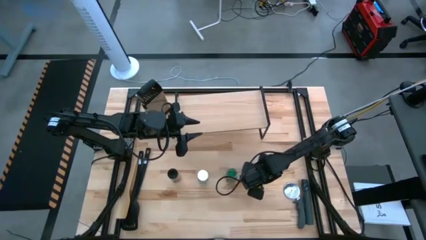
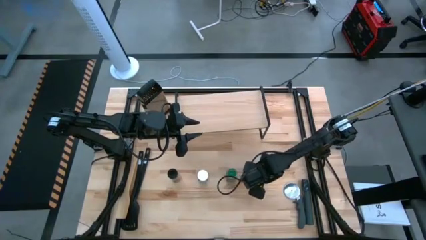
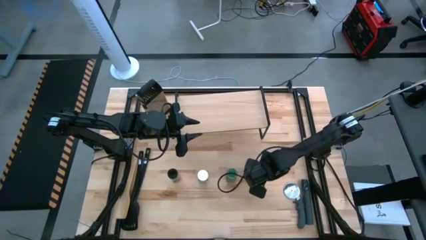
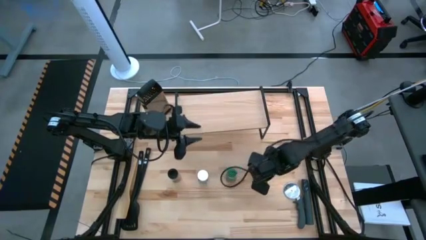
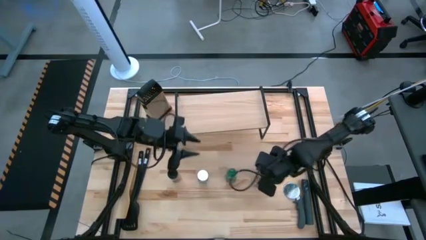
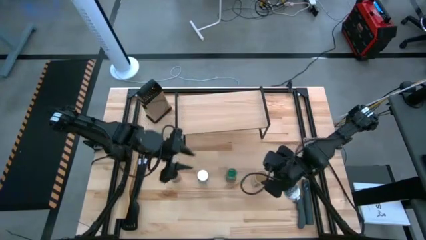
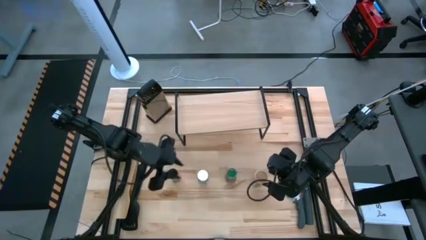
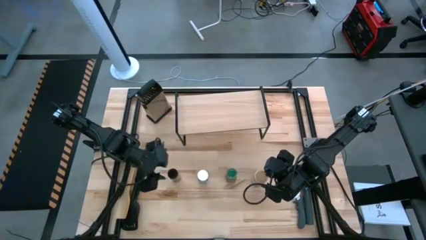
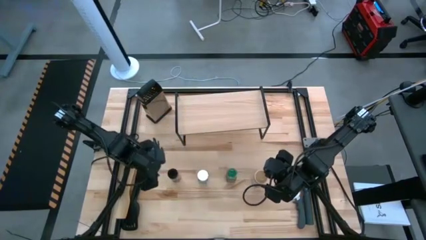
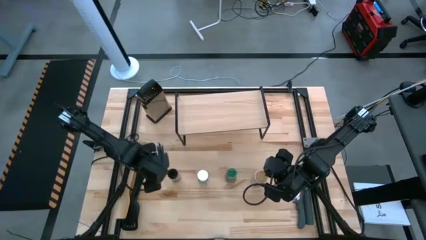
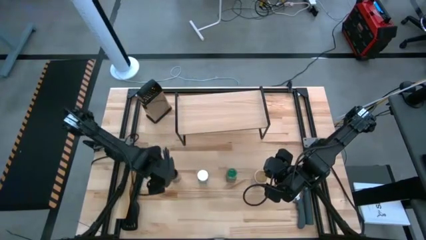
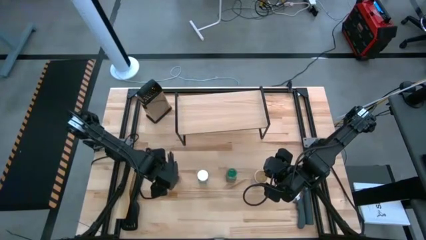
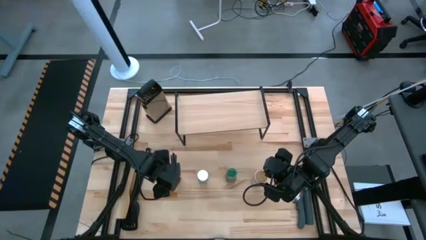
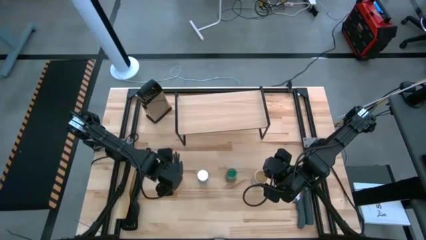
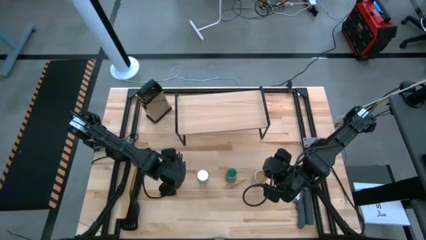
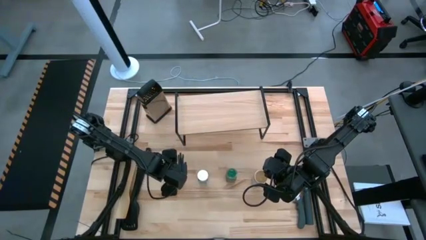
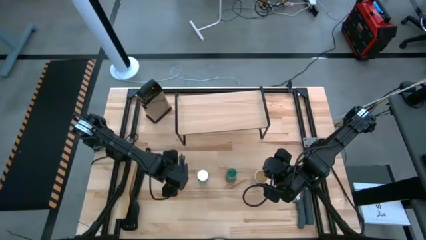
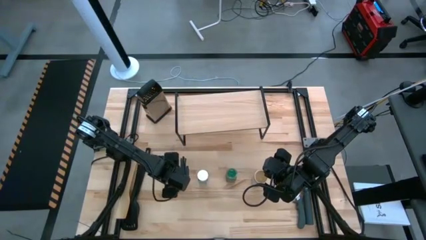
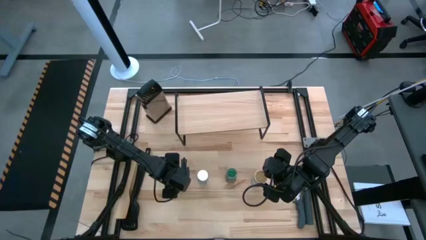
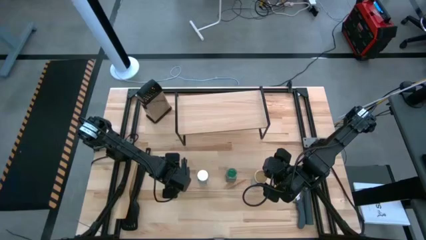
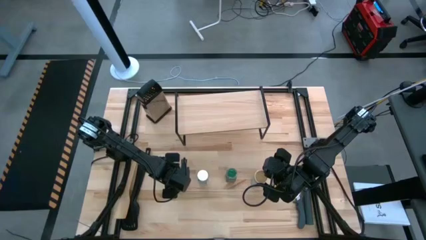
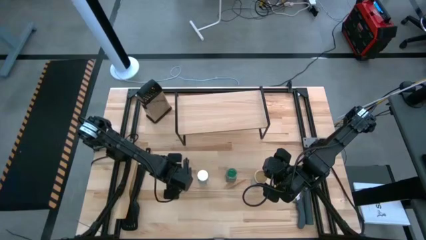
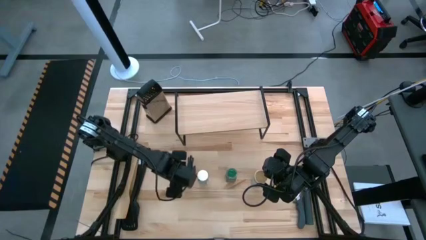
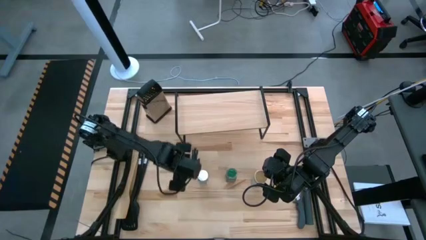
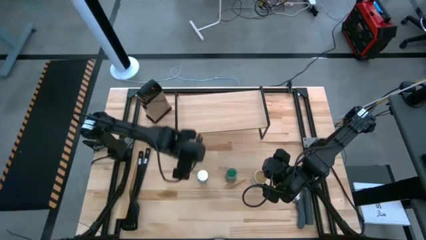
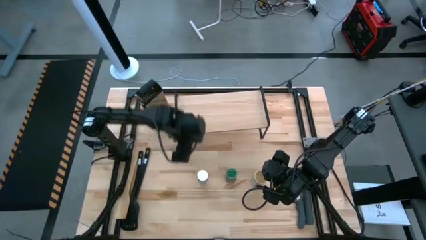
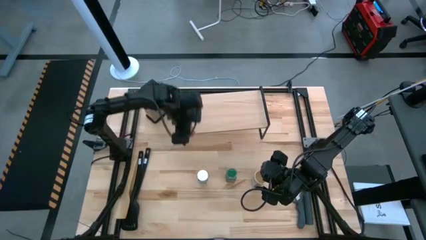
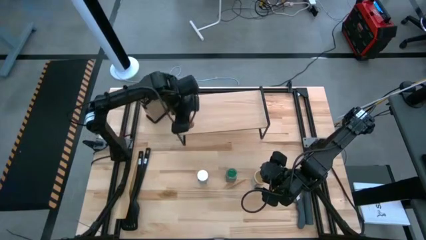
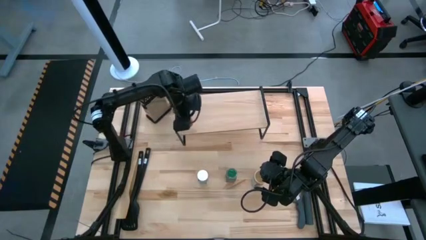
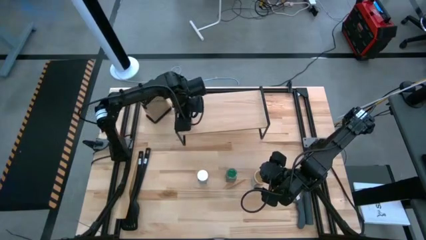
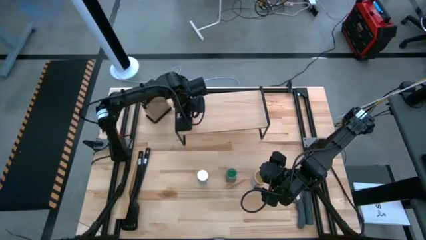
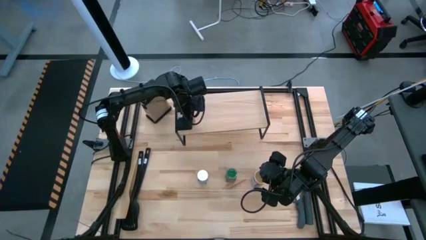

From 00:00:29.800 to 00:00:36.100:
Task: Shelf spices
Put the black seasoning bottle on the shelf

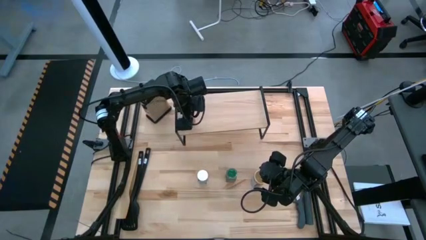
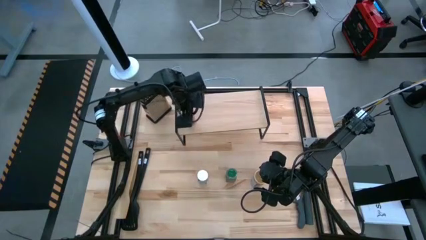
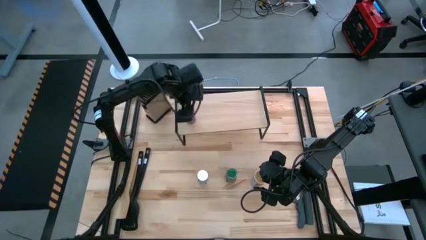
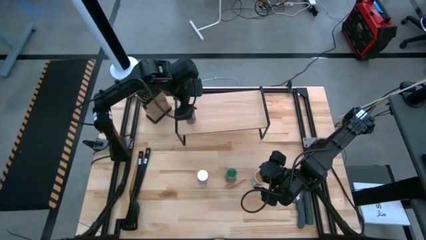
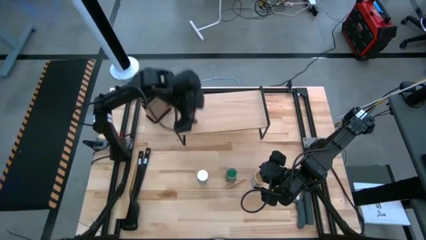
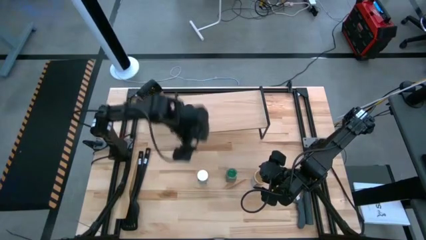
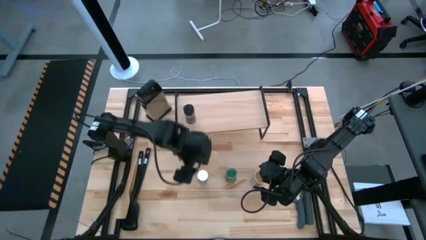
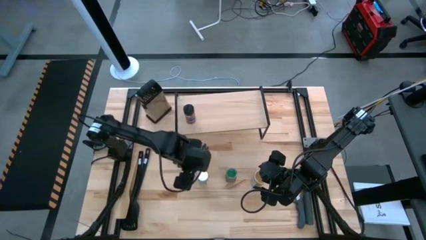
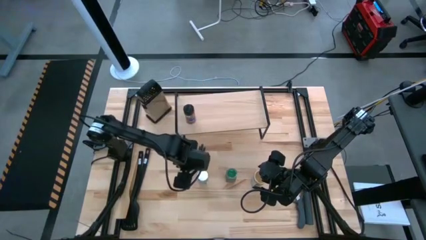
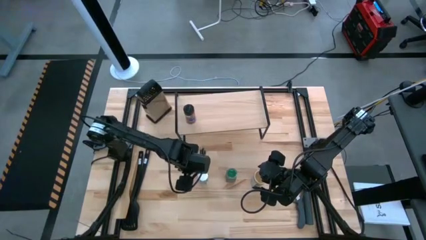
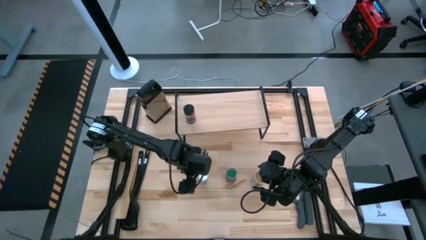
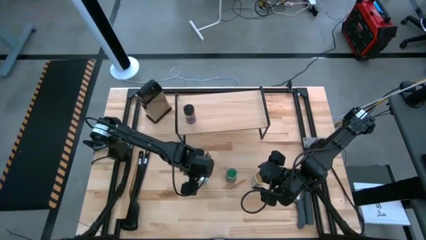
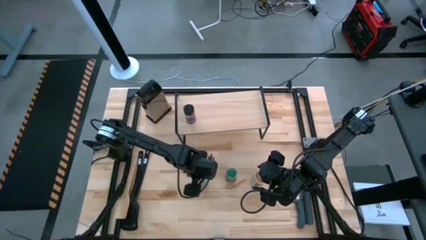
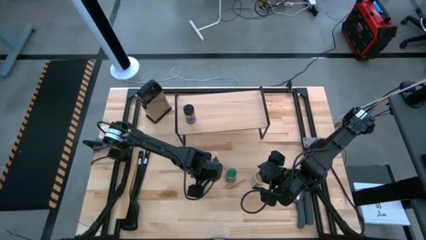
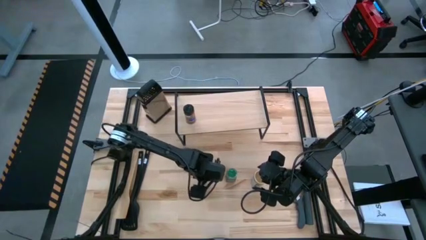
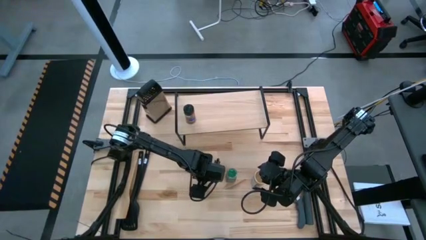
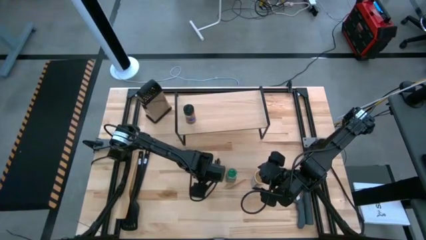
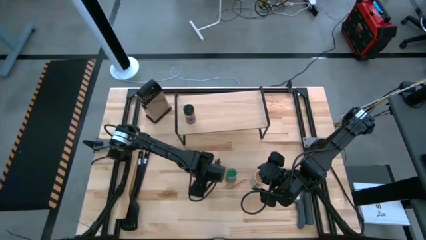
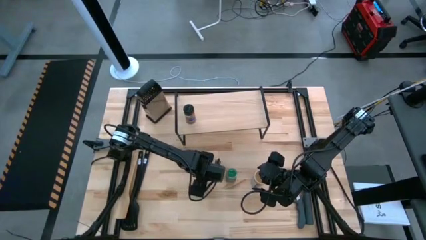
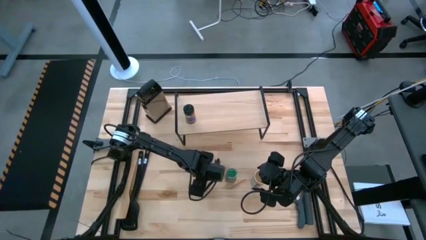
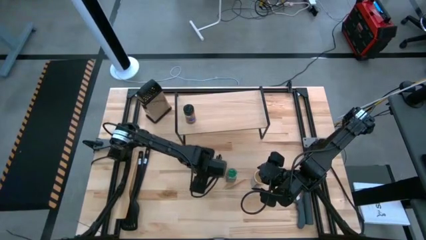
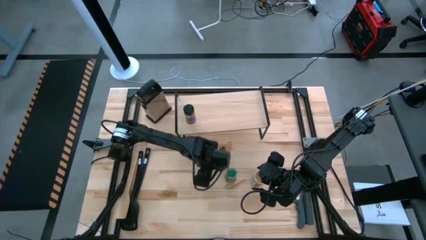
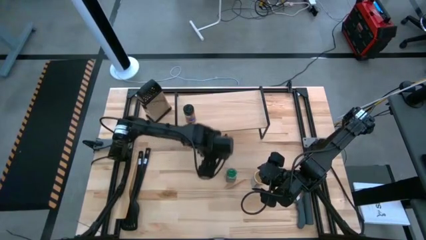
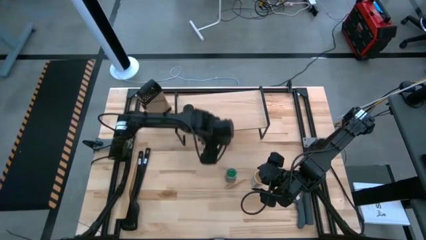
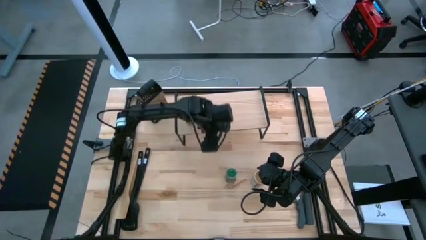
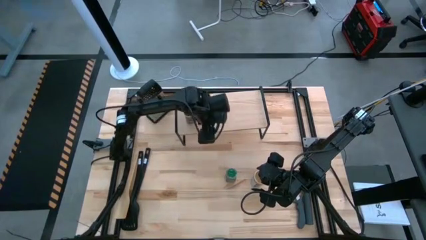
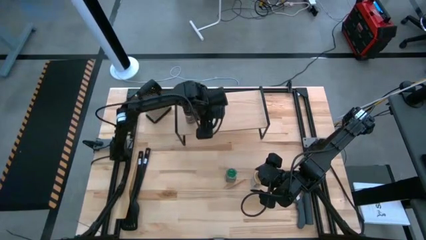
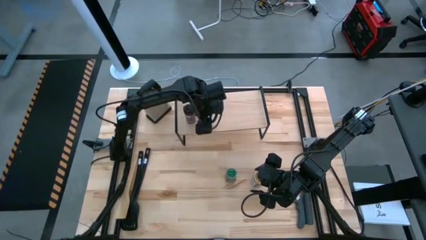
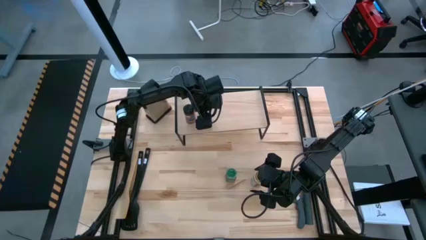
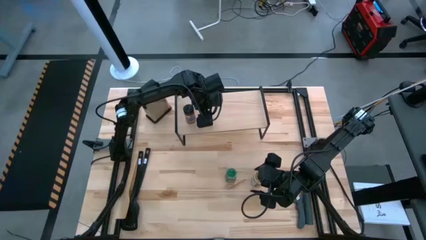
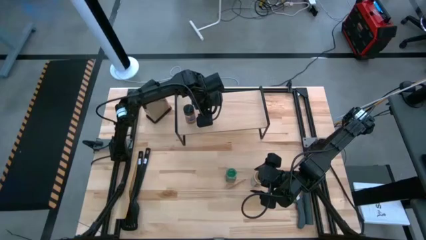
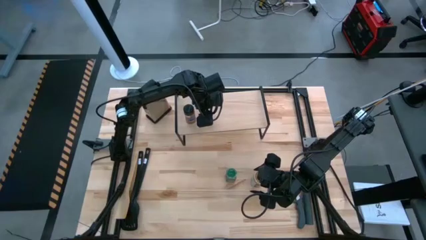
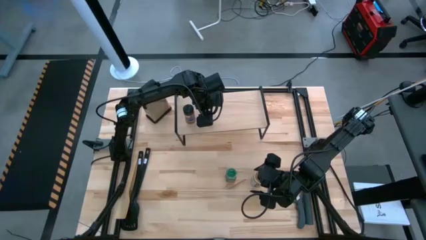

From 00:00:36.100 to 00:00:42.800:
Put the white seasoning bottle on the shelf

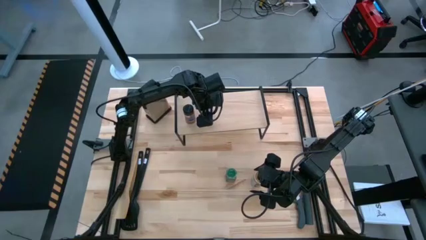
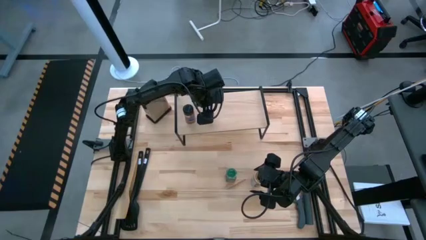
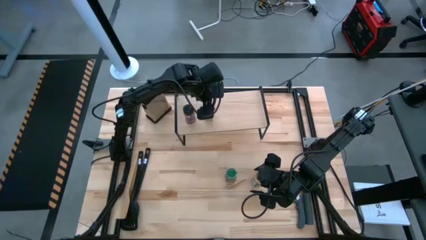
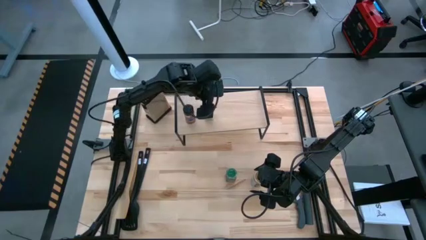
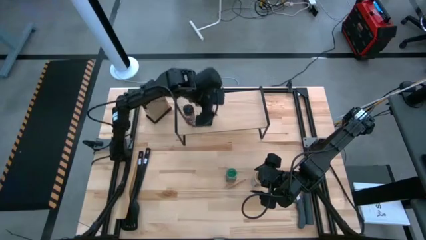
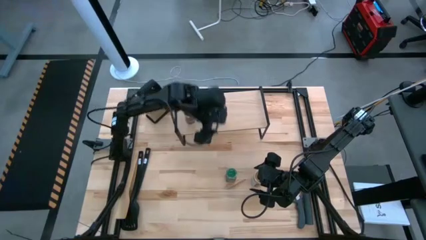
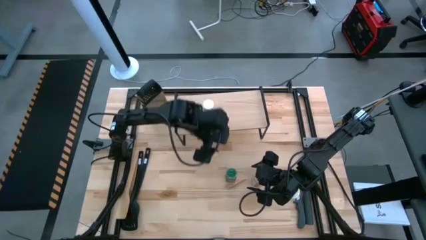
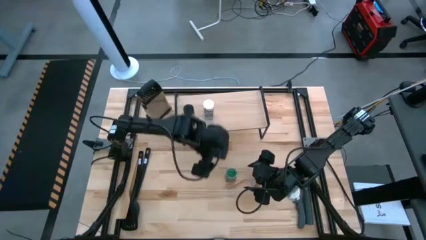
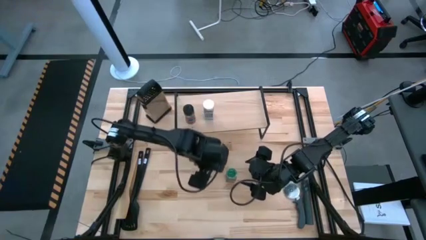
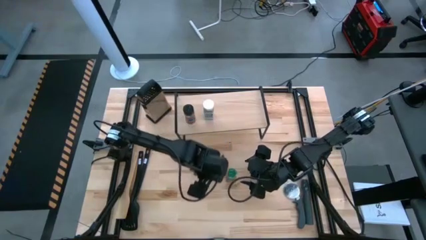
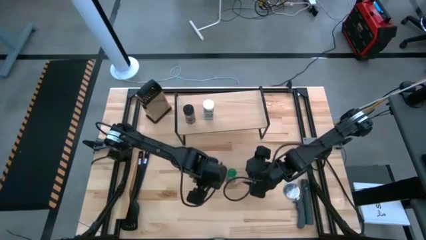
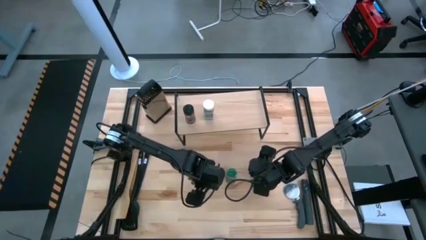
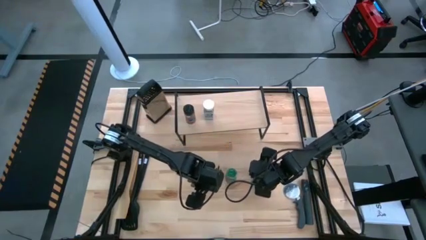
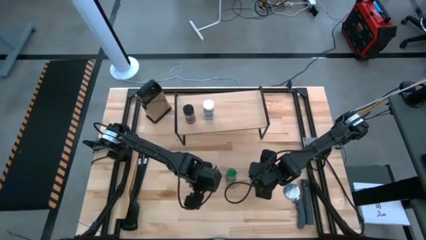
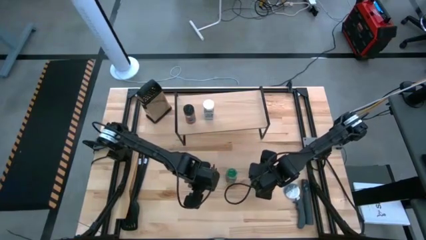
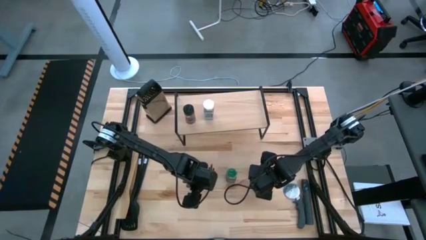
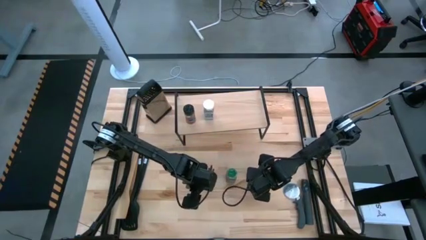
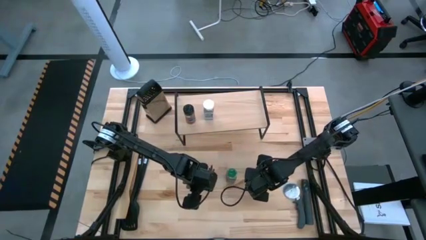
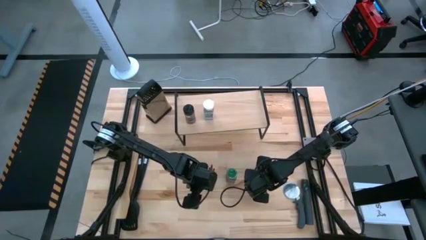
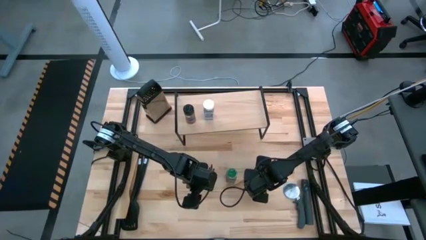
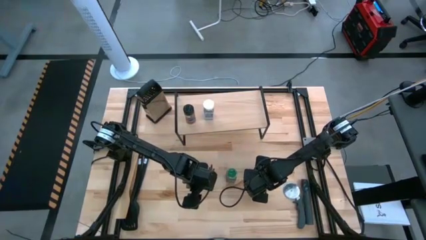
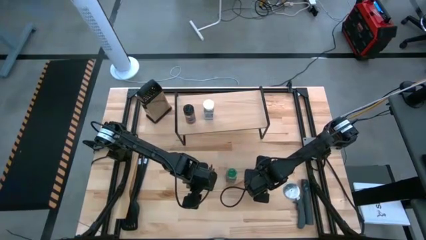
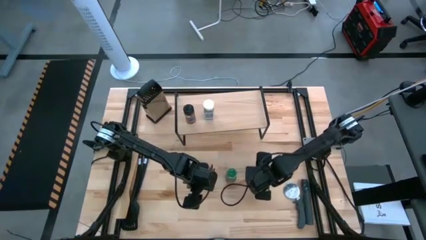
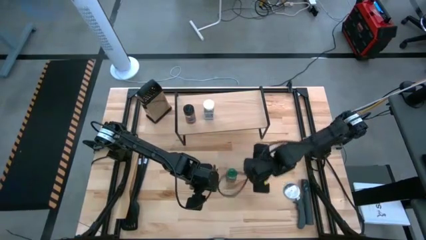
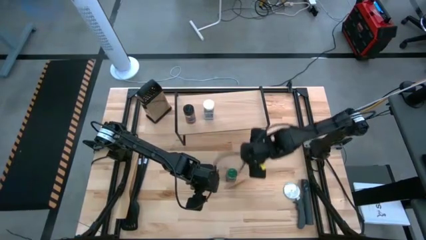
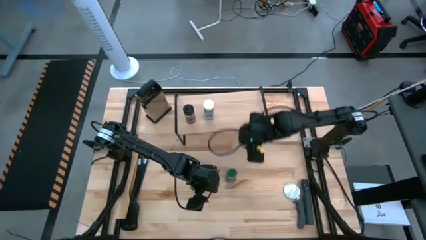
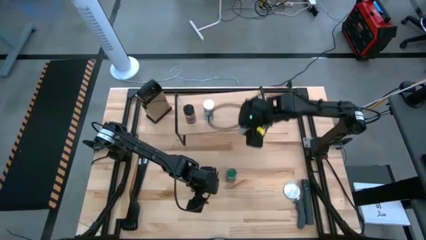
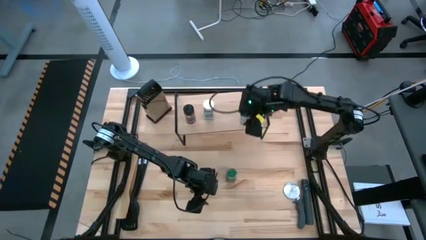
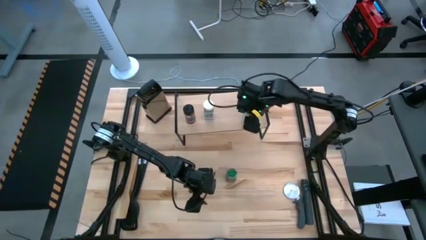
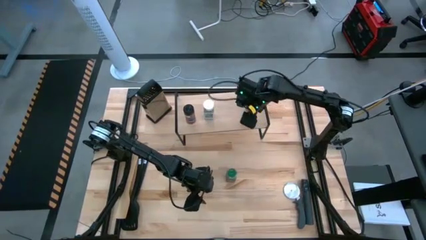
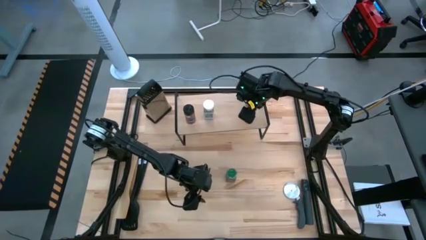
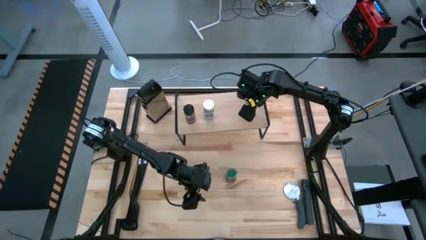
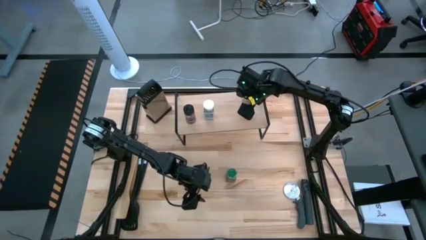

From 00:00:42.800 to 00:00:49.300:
Put the brown seasoning bottle on the shelf
